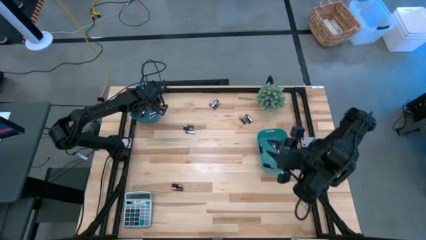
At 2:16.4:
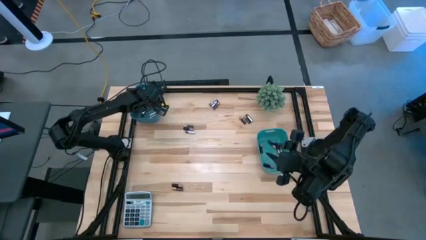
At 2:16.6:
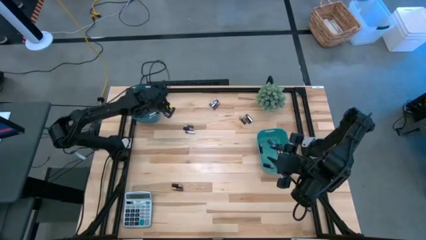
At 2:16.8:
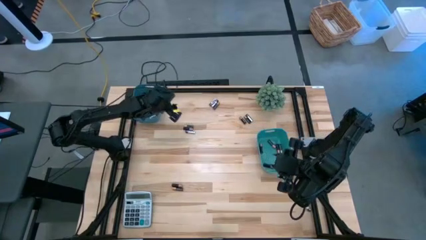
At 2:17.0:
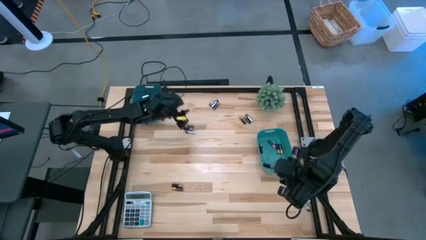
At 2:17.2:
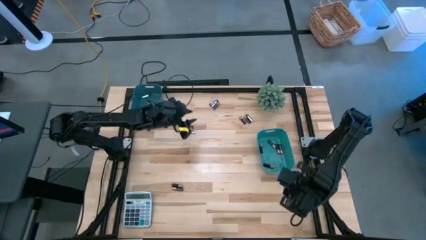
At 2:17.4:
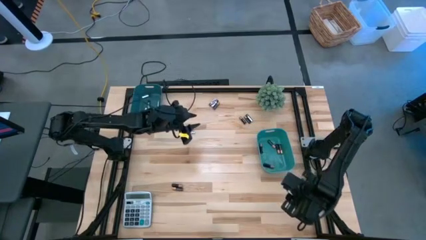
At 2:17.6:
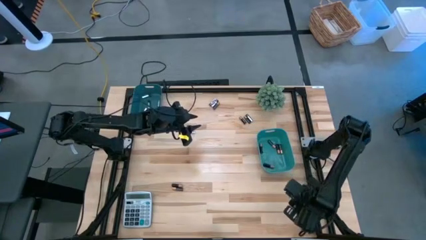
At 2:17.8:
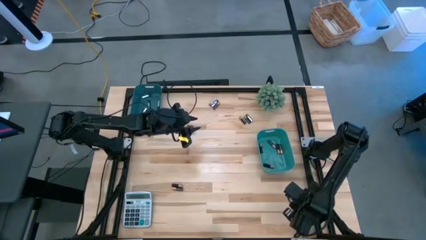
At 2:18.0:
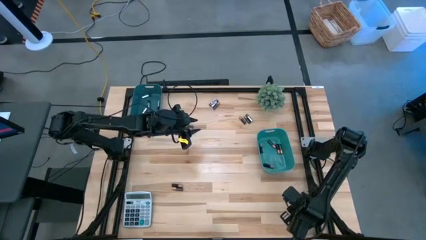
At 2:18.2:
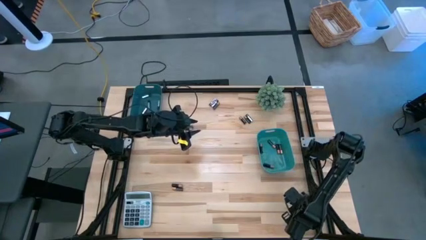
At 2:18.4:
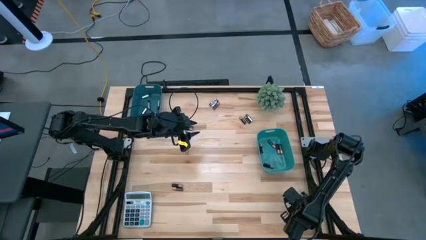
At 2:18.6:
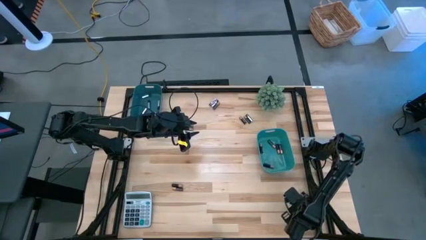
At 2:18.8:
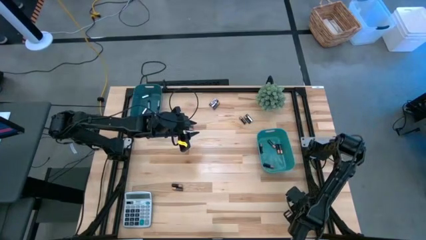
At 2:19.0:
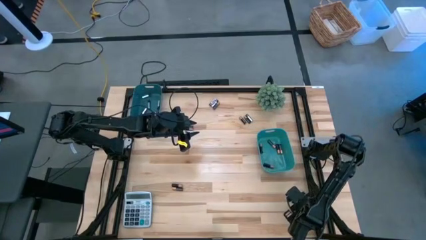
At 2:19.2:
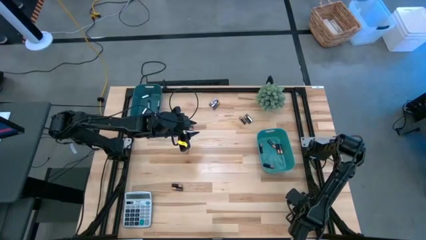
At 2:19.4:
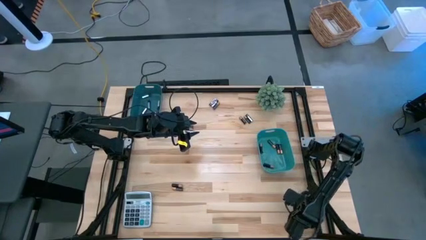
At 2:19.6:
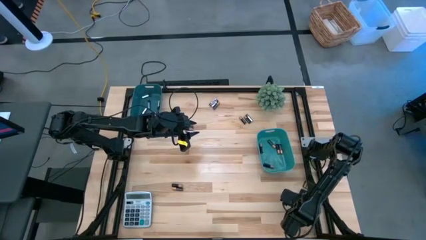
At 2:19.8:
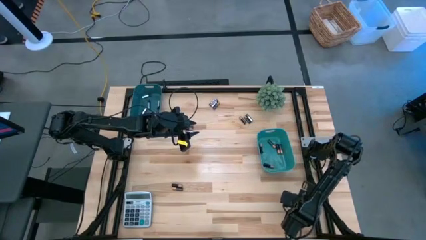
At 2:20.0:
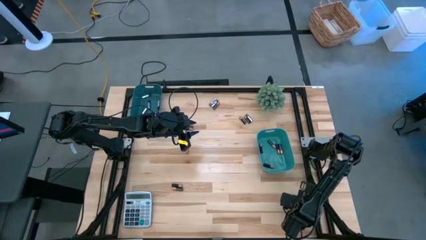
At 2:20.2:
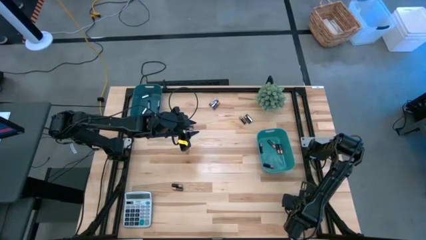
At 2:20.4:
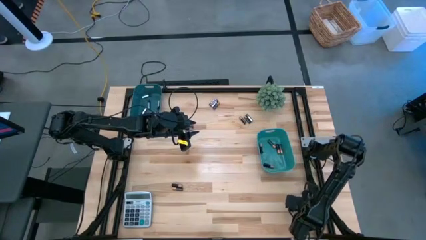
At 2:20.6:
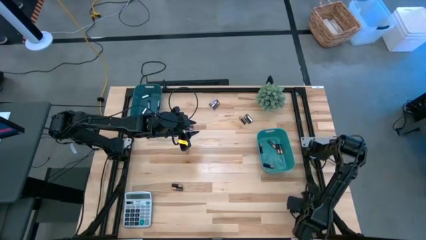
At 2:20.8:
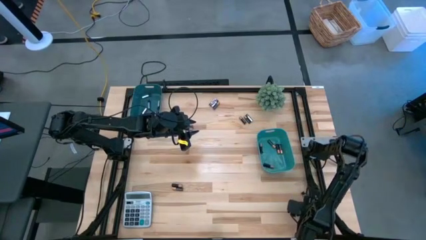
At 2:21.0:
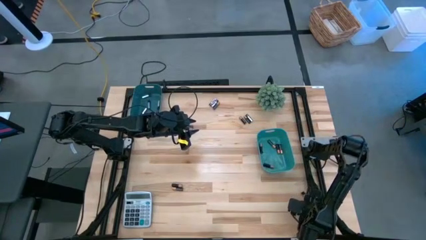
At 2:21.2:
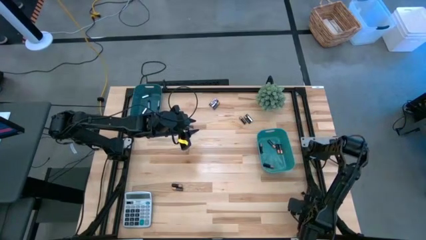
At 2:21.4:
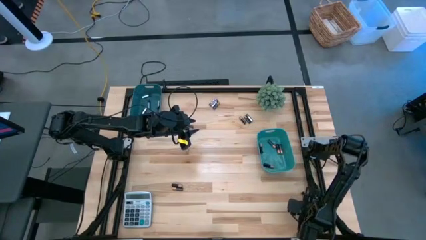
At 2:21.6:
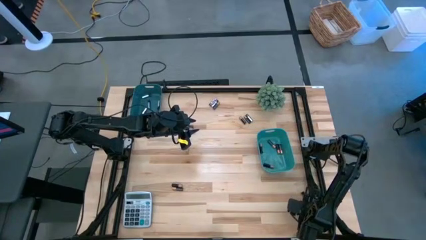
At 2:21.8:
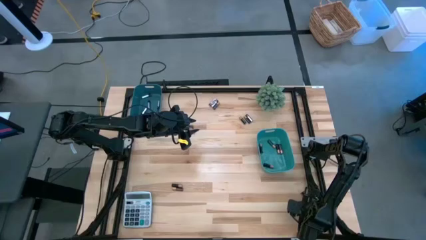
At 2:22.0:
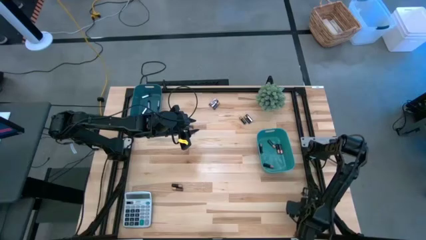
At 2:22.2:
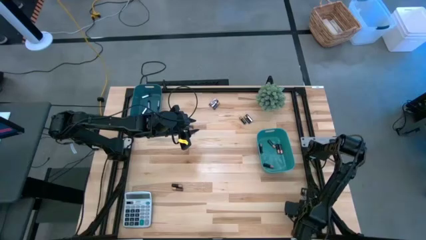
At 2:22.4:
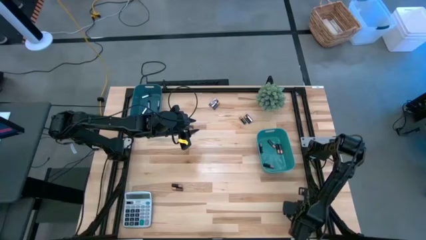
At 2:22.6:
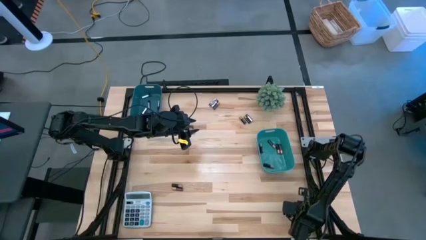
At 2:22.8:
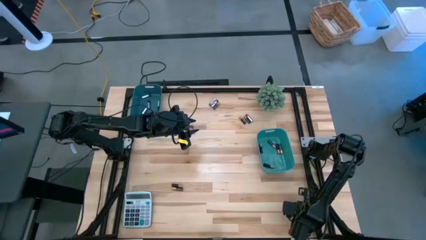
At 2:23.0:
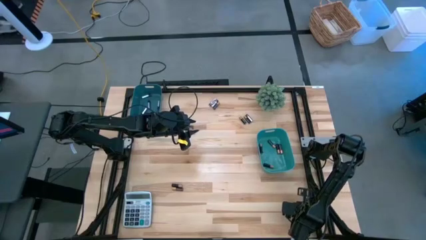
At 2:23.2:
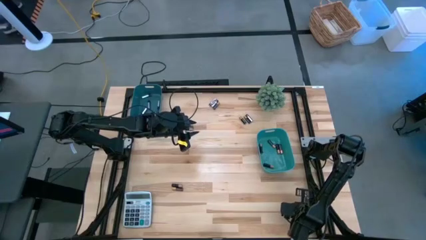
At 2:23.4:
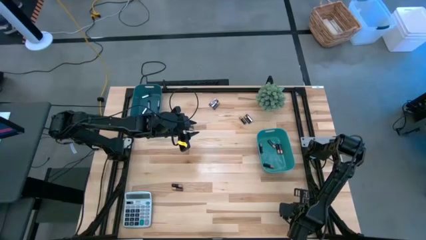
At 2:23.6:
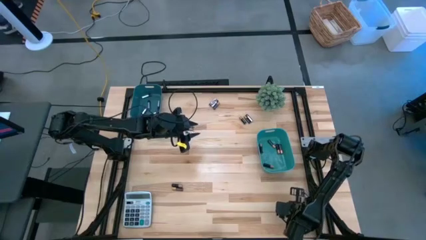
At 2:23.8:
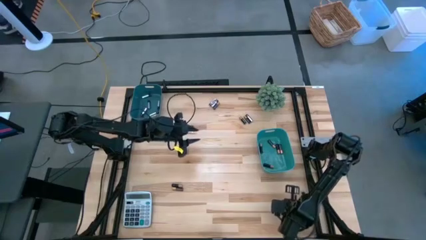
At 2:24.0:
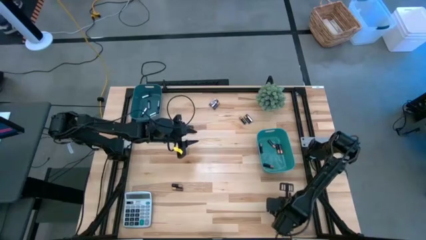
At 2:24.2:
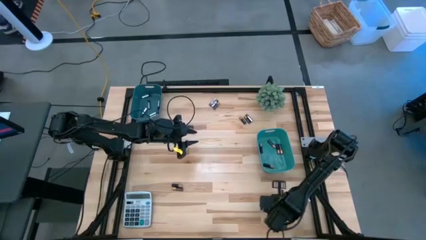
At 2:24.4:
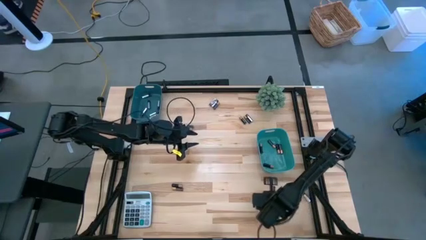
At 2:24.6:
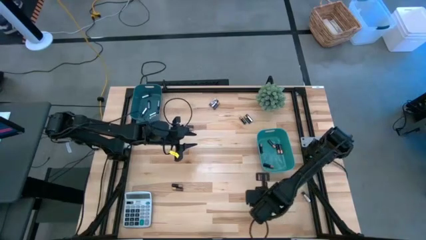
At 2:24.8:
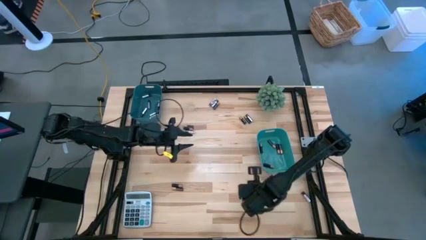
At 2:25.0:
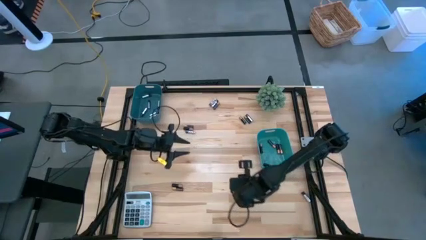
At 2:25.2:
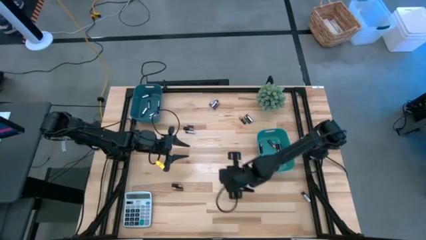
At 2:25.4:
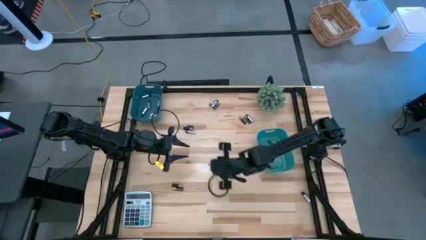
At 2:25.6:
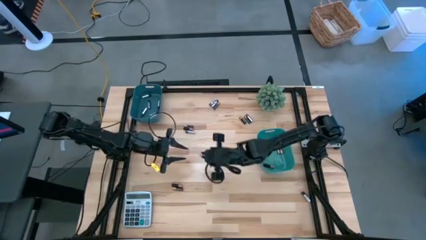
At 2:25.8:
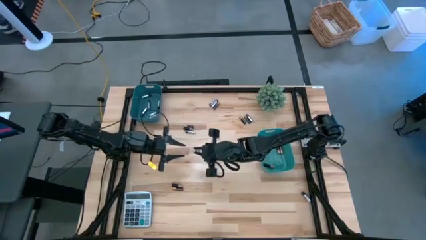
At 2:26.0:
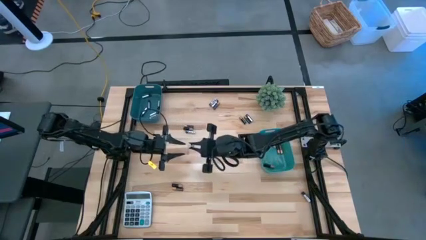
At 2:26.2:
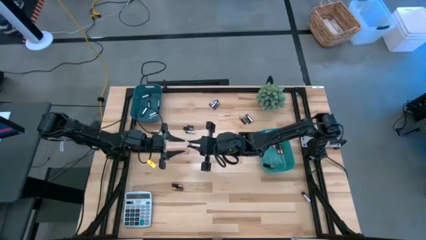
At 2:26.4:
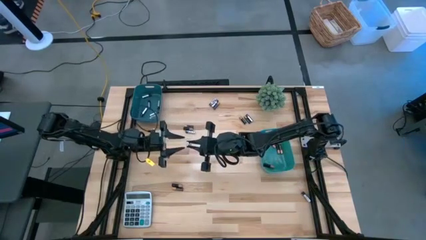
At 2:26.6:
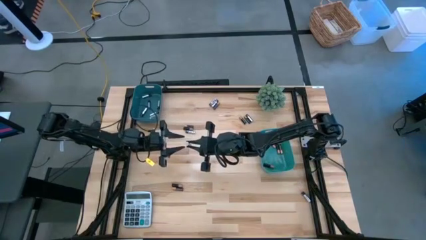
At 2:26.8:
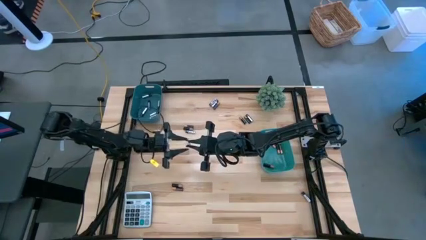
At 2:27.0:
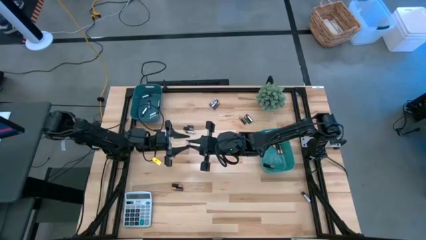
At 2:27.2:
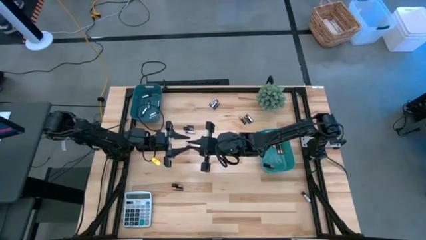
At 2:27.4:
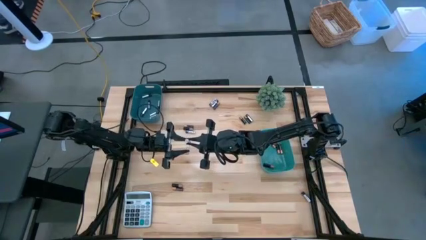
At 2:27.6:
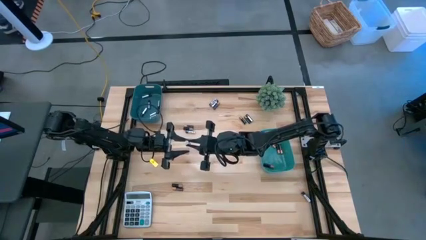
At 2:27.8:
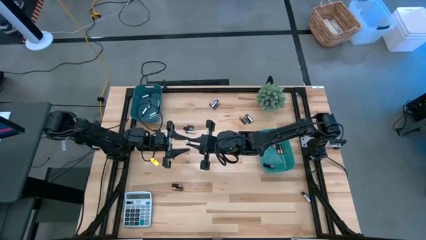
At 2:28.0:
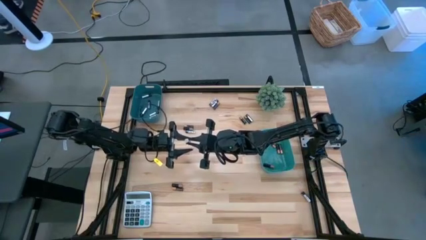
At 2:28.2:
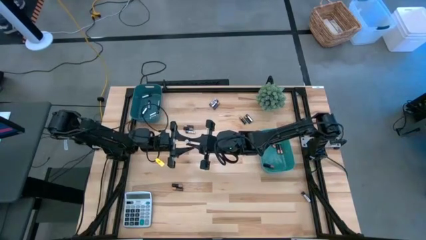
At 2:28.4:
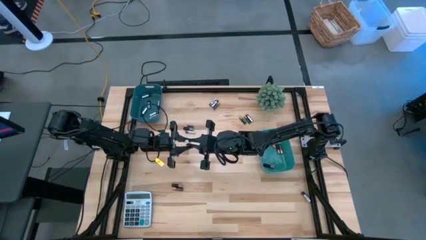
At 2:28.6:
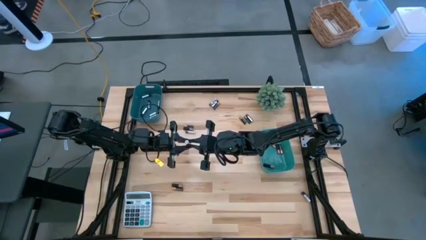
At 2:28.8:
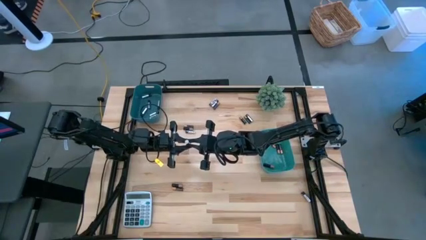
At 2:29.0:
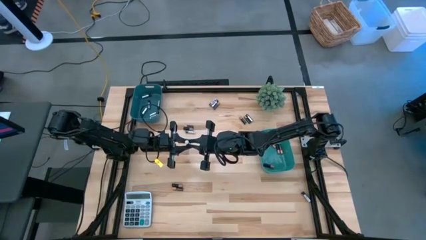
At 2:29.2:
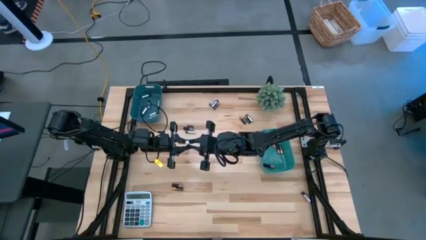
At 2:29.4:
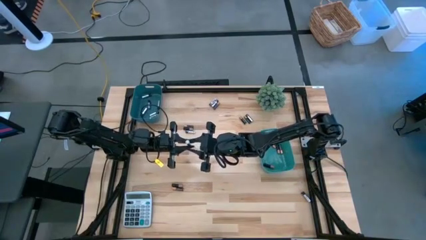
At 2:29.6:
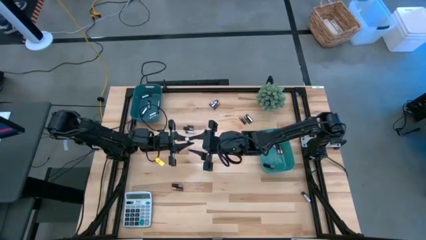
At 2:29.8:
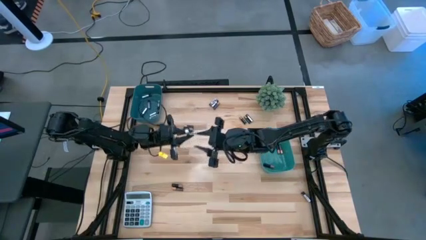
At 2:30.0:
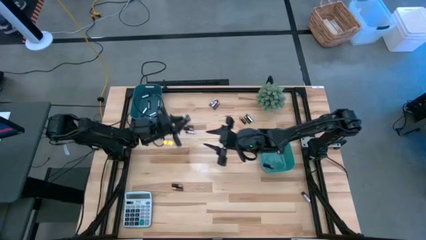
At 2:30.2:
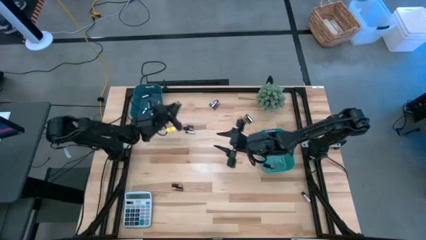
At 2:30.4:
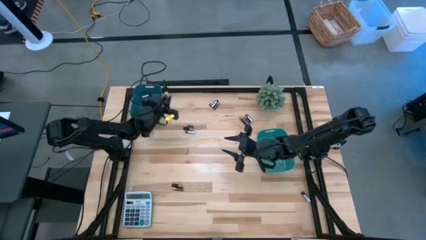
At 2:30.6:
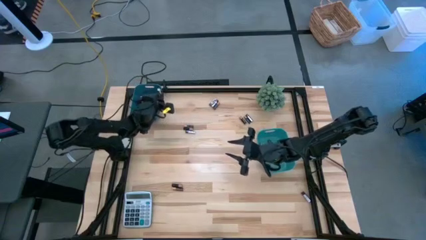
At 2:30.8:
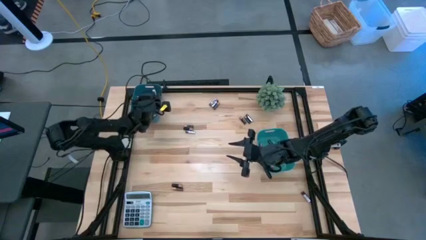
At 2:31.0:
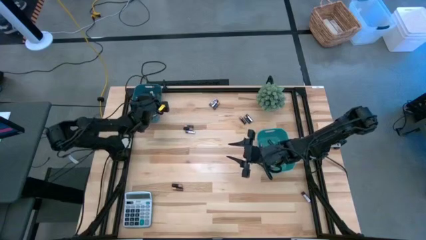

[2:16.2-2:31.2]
Task: Sort batteries
Put the black-silver battery into the blue bin
